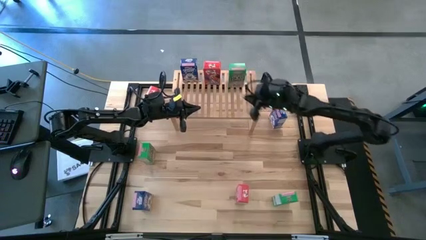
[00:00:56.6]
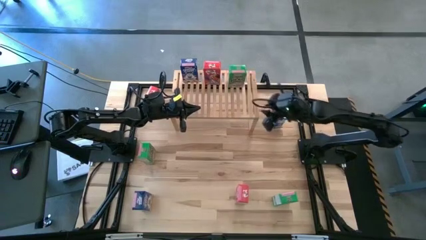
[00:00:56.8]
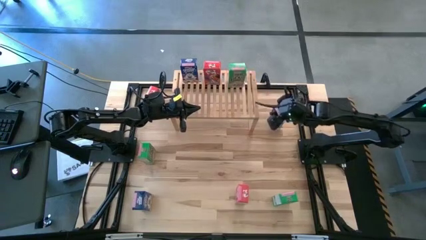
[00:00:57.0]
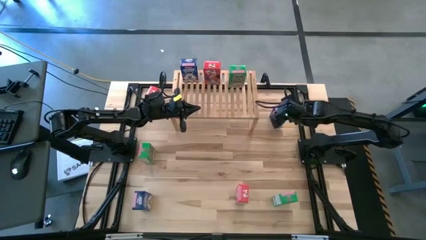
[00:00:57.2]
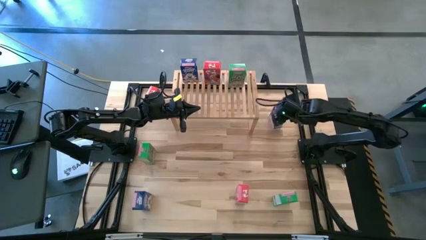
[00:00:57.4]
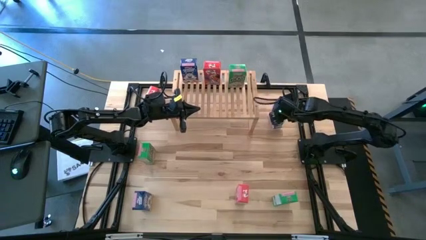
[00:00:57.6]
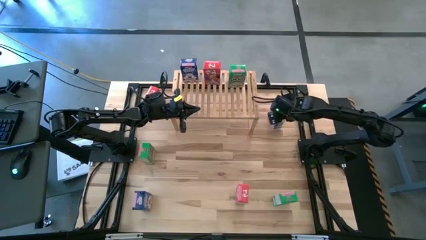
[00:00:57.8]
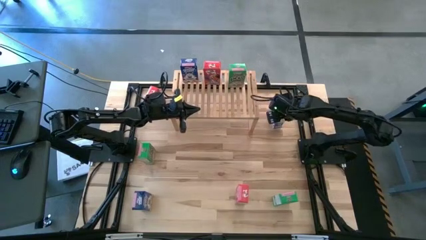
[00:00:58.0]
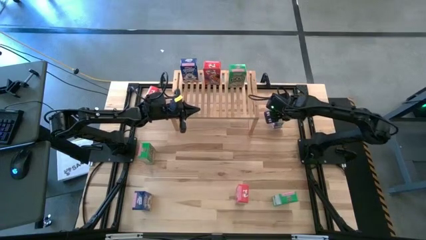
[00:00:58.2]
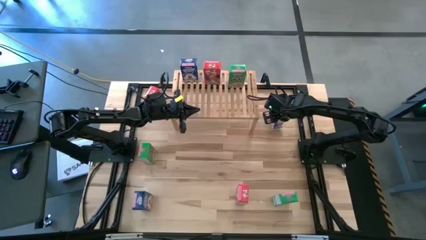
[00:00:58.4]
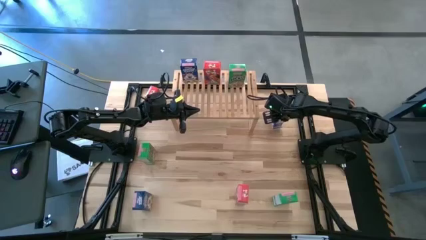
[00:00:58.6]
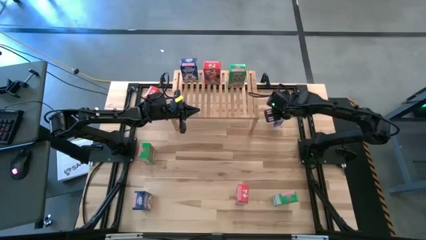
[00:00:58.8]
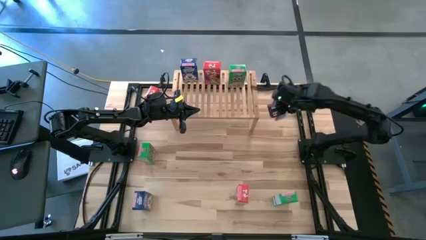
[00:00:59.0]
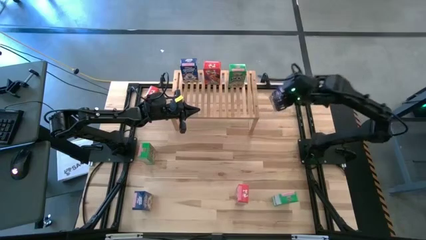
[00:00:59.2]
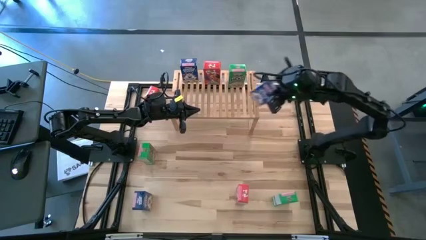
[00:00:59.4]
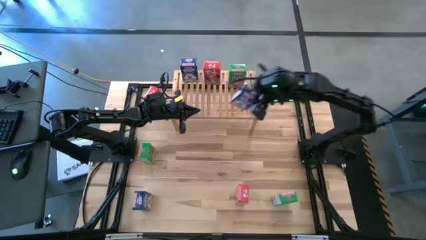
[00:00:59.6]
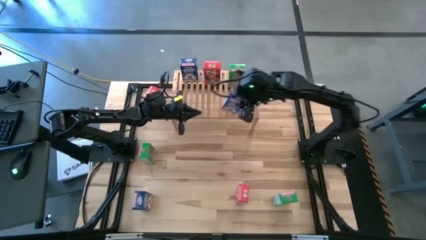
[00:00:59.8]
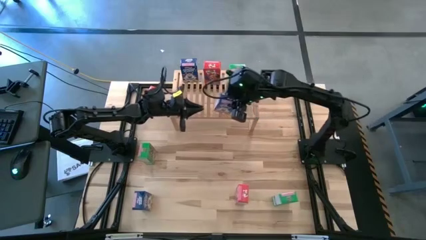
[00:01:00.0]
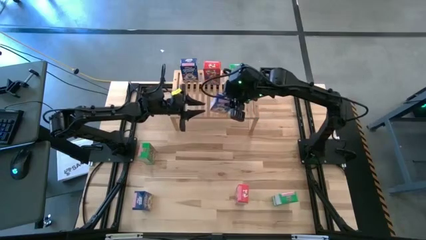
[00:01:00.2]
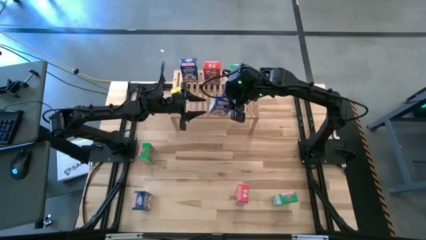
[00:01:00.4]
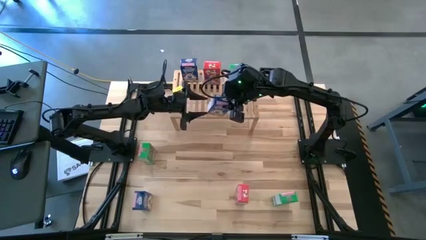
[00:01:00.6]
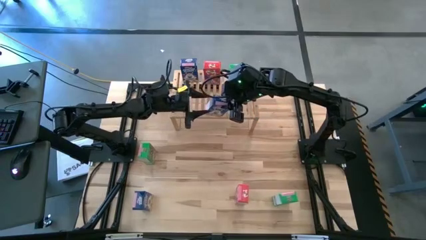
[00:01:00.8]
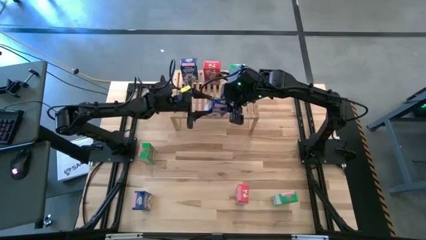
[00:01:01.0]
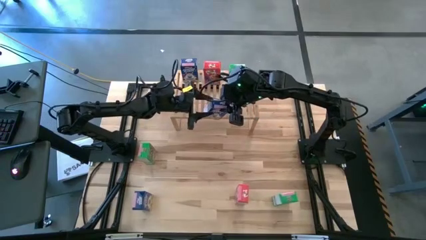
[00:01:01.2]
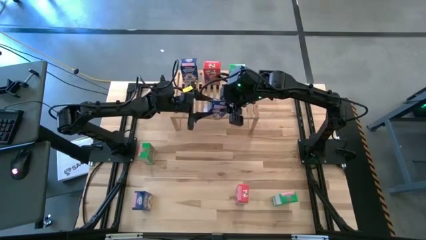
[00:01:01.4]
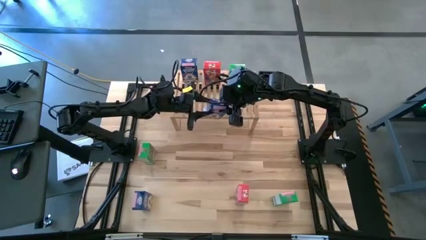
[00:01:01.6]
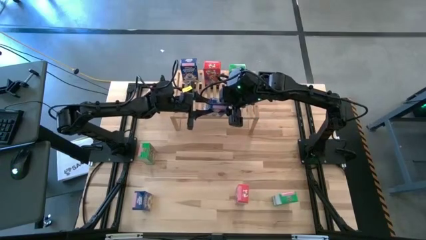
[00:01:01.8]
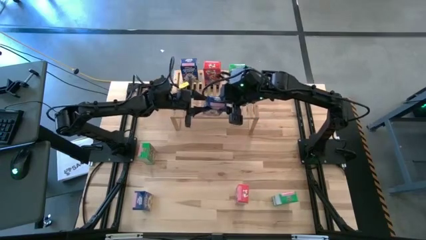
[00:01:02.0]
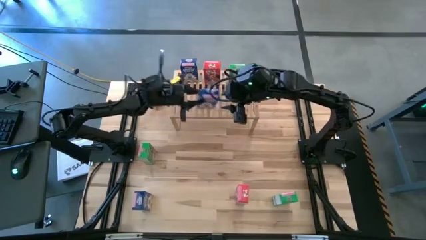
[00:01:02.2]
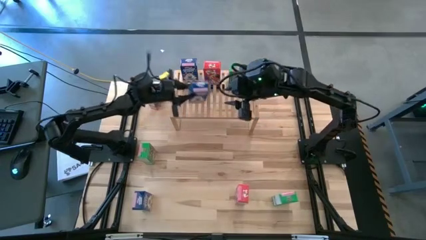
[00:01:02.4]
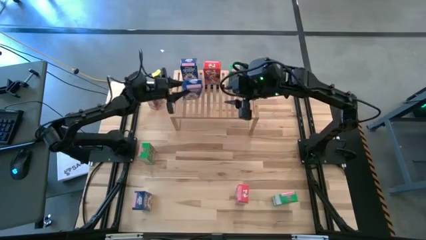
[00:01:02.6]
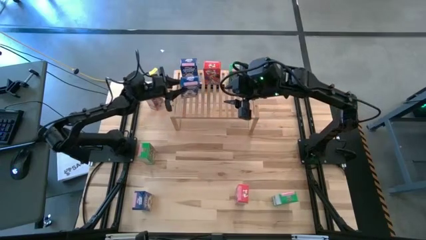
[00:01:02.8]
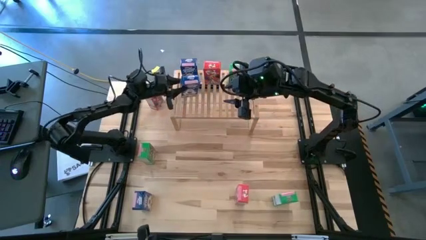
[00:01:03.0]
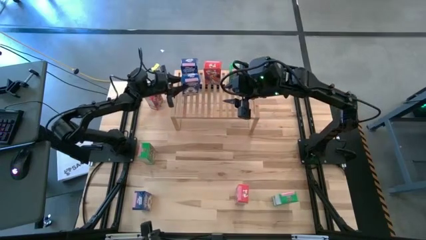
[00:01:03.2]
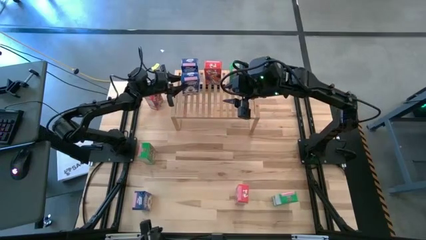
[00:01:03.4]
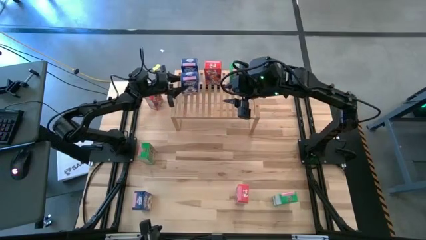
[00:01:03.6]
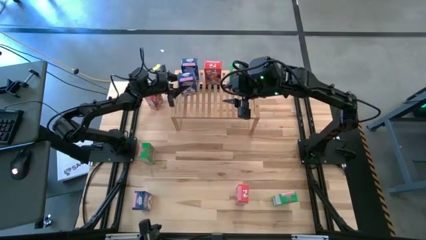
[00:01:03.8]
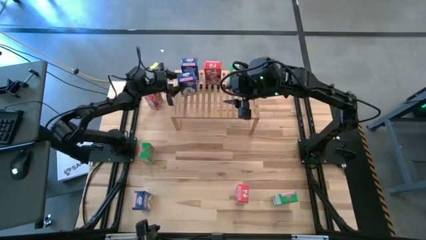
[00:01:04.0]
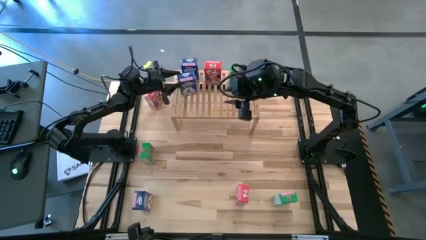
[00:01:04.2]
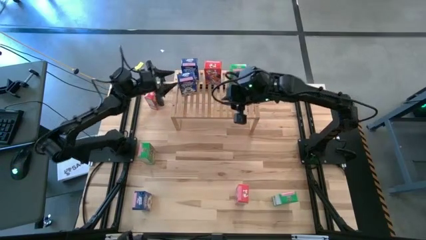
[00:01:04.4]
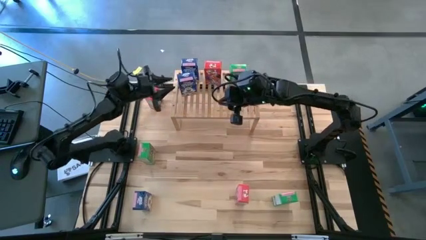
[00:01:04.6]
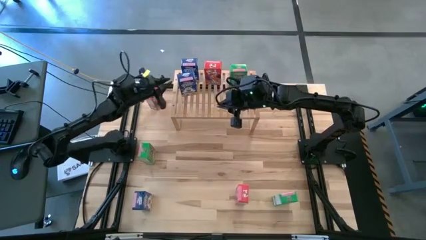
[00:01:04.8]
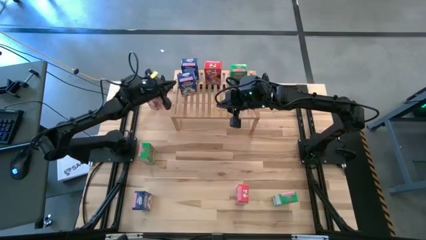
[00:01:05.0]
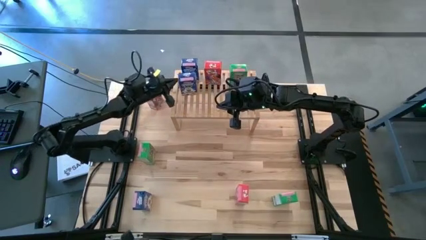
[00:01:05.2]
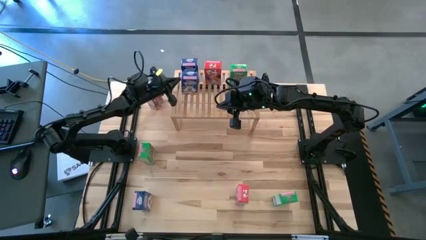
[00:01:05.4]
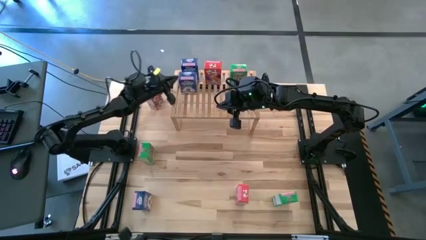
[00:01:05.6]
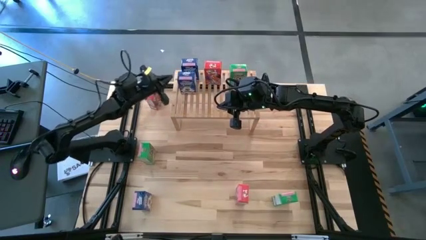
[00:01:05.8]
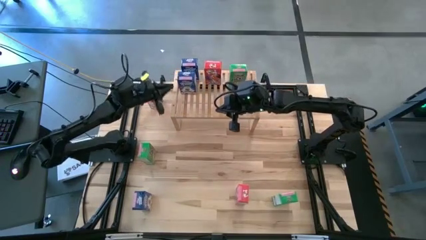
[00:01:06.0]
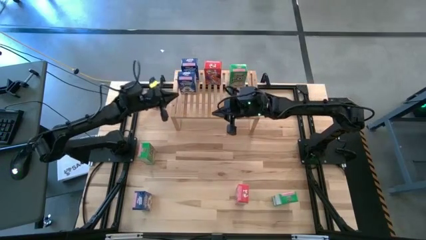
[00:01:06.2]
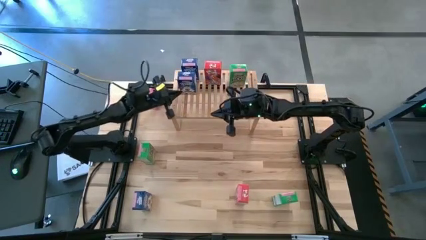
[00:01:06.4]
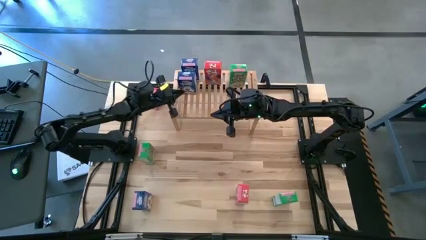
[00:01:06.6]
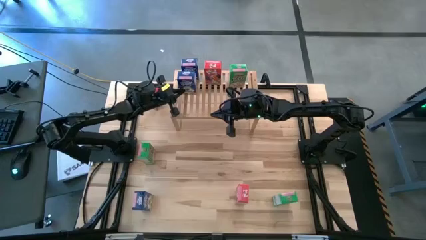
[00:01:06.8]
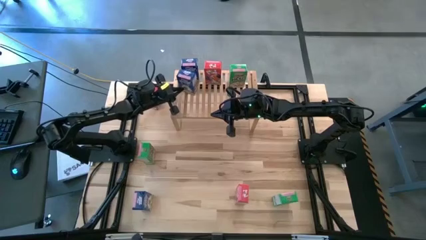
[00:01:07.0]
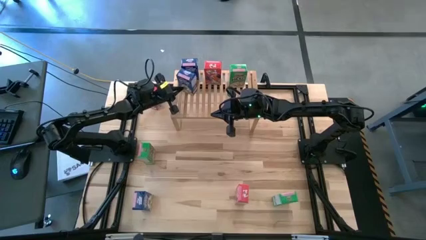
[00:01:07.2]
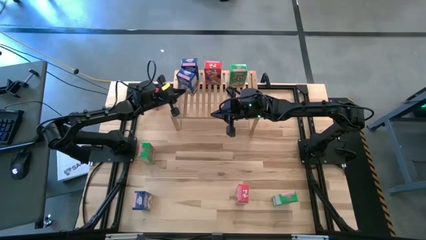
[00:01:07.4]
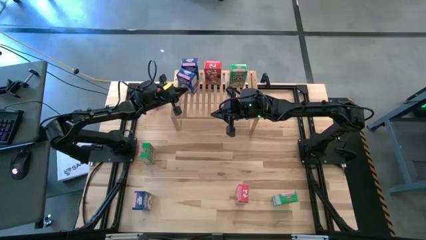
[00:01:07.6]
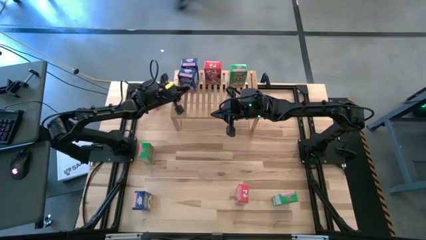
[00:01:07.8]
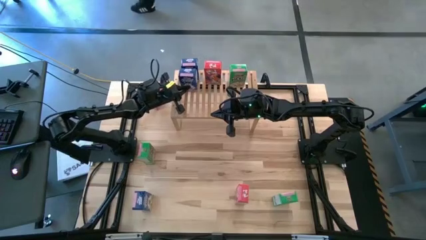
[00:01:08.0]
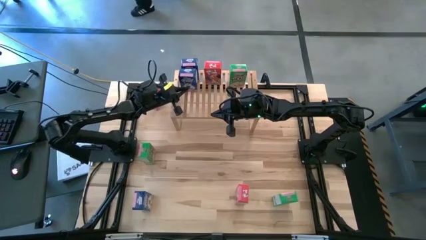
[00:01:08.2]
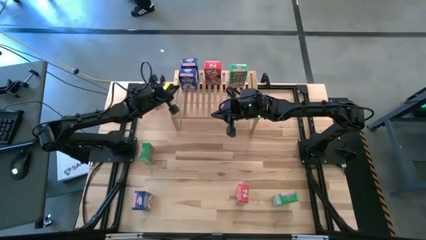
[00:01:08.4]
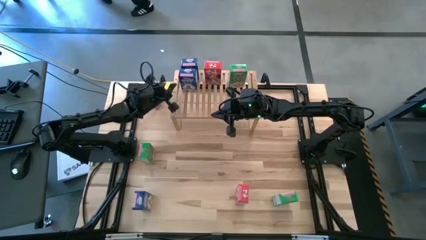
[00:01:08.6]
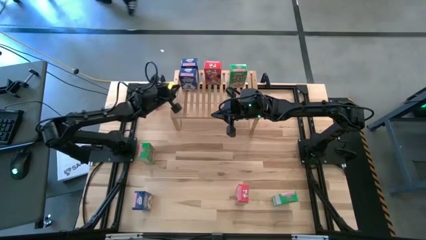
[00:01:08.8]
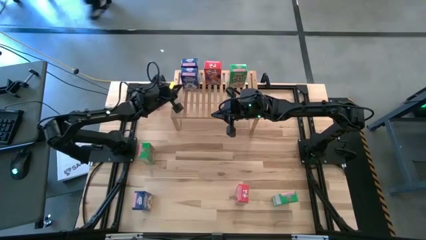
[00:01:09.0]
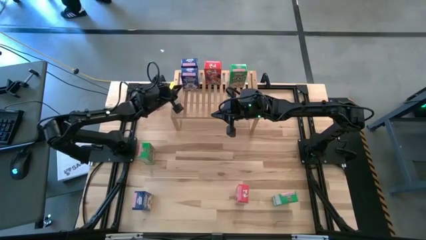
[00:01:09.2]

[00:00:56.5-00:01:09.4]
Task: Stack cereal on shelf
Put the top blue cereal box on the shelf aligned with the other blue cereal box
